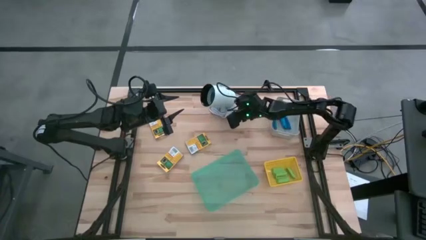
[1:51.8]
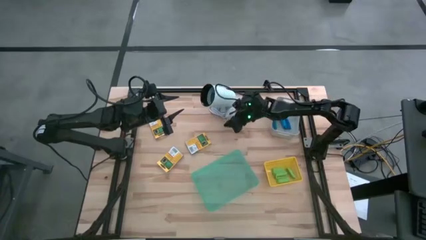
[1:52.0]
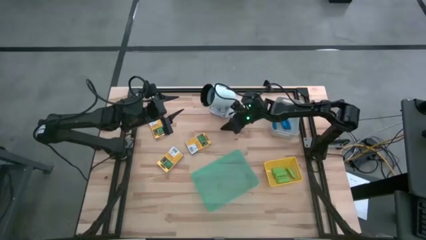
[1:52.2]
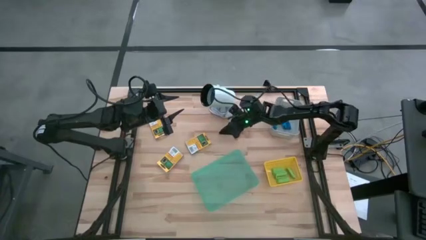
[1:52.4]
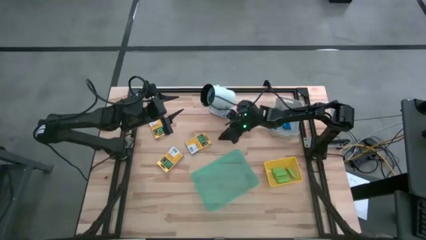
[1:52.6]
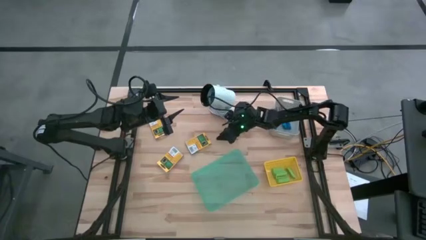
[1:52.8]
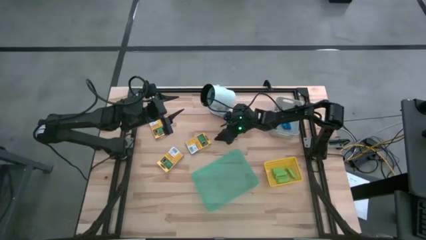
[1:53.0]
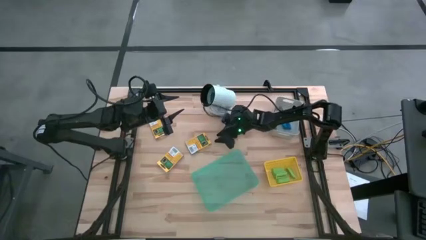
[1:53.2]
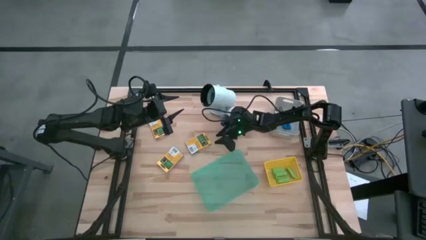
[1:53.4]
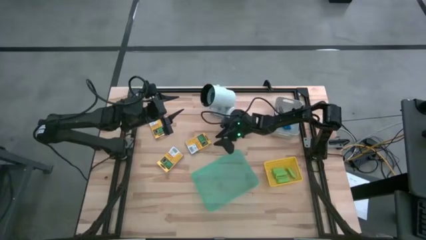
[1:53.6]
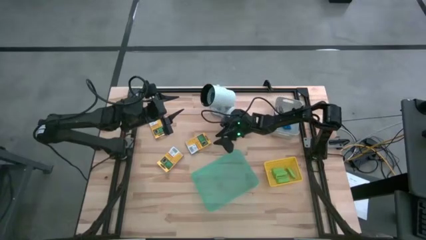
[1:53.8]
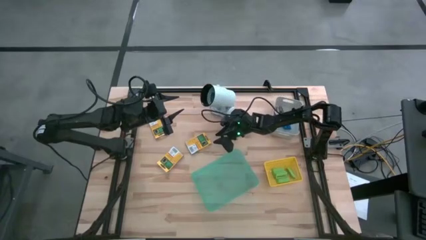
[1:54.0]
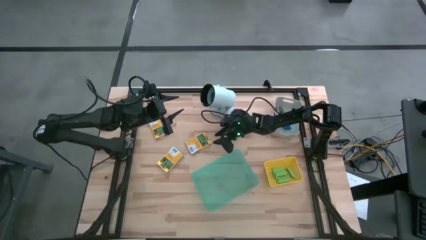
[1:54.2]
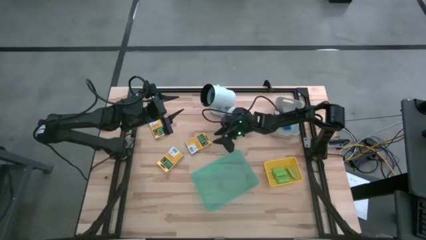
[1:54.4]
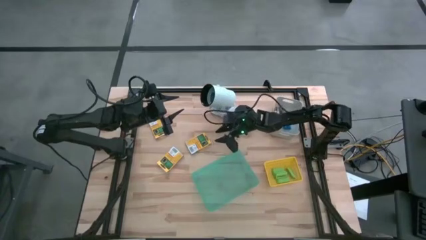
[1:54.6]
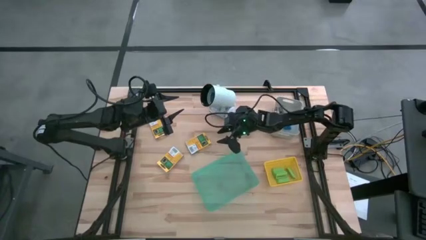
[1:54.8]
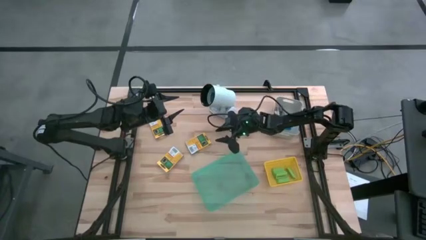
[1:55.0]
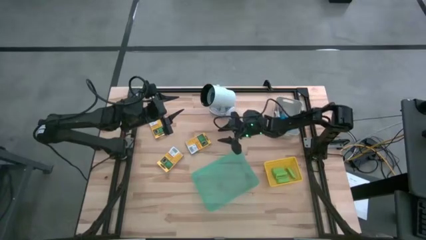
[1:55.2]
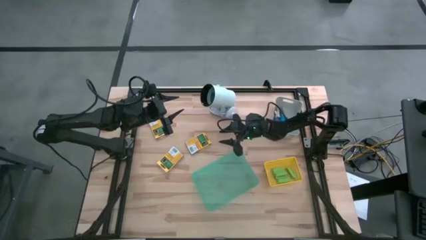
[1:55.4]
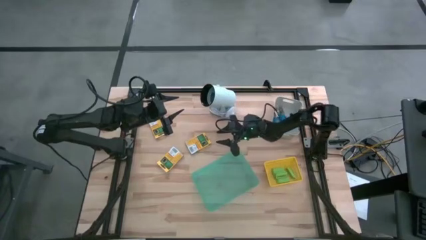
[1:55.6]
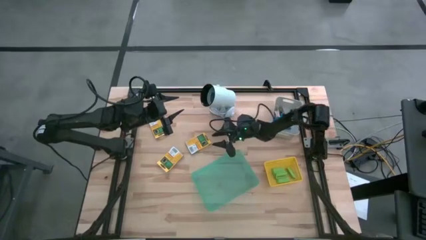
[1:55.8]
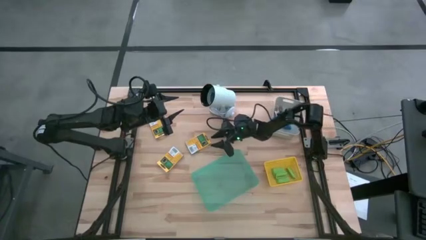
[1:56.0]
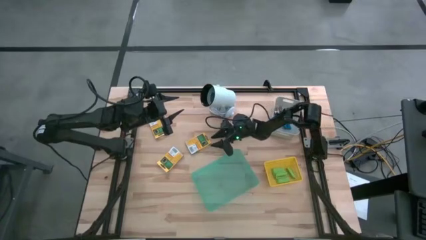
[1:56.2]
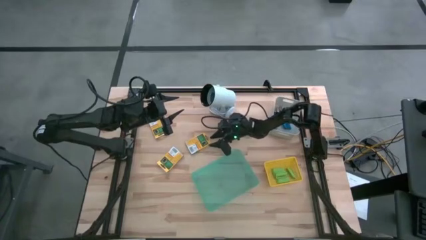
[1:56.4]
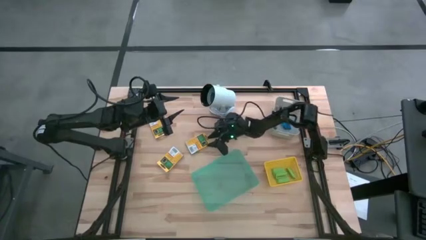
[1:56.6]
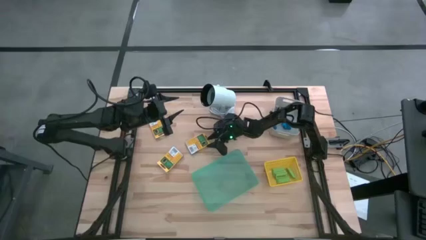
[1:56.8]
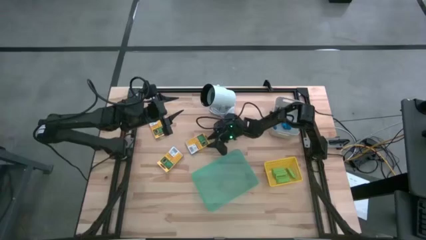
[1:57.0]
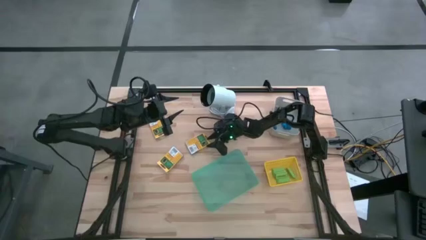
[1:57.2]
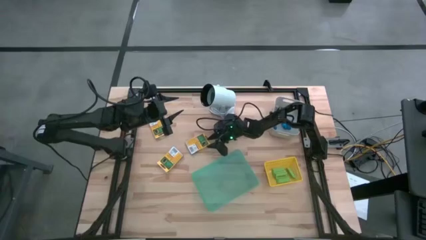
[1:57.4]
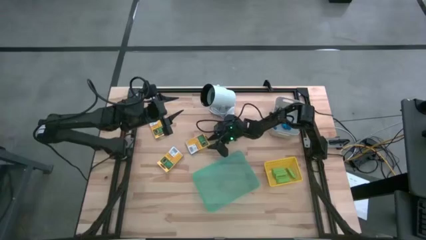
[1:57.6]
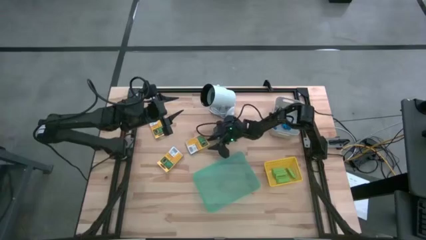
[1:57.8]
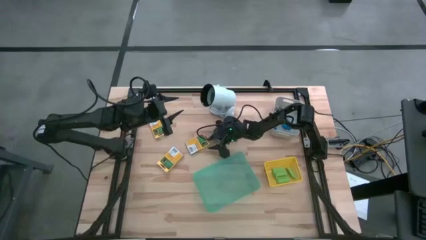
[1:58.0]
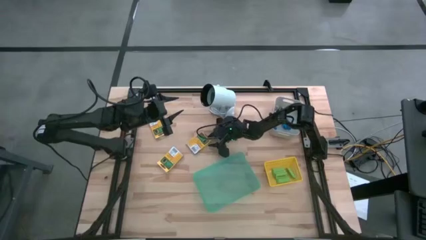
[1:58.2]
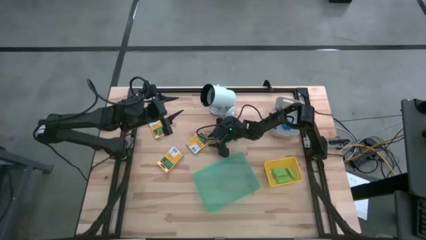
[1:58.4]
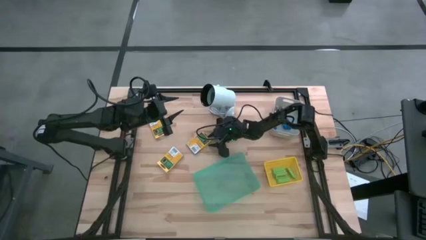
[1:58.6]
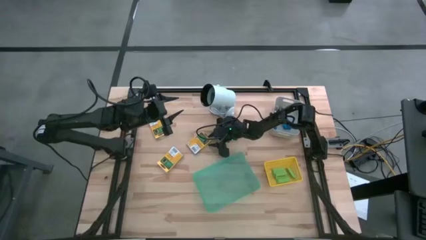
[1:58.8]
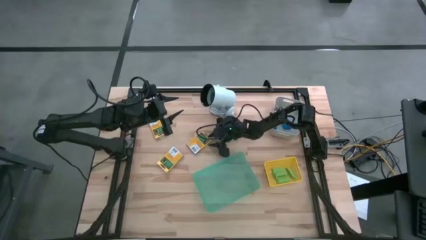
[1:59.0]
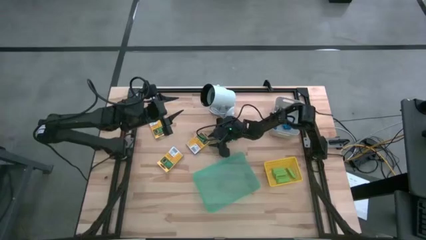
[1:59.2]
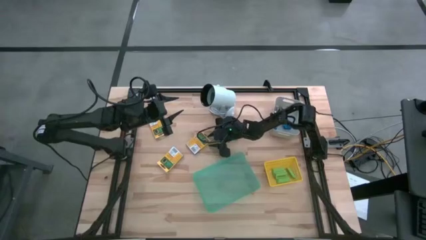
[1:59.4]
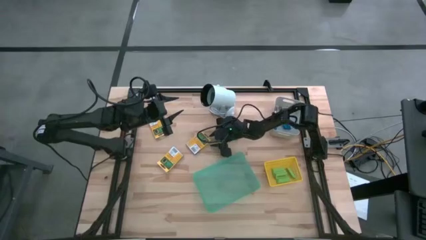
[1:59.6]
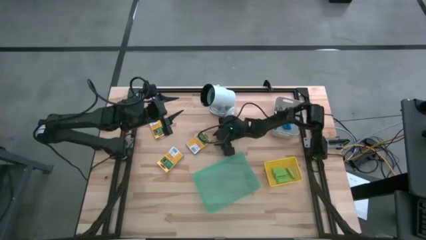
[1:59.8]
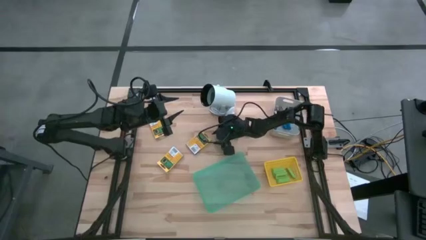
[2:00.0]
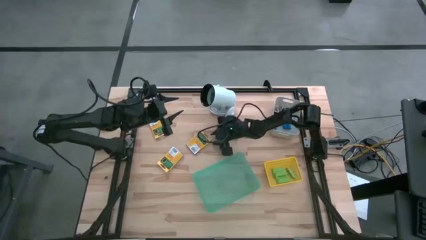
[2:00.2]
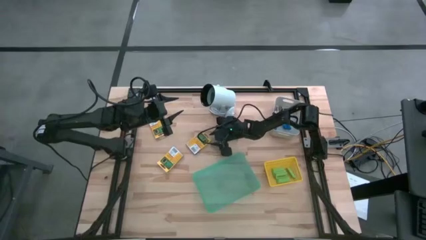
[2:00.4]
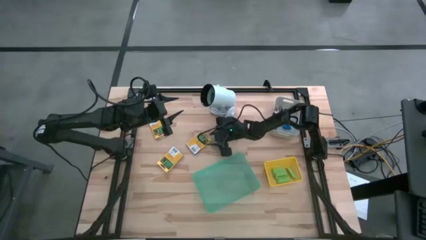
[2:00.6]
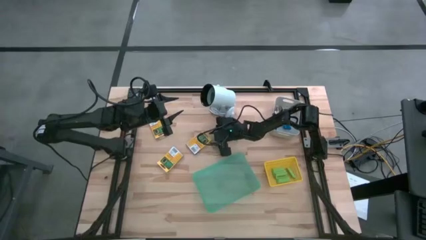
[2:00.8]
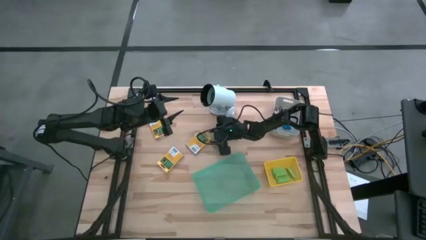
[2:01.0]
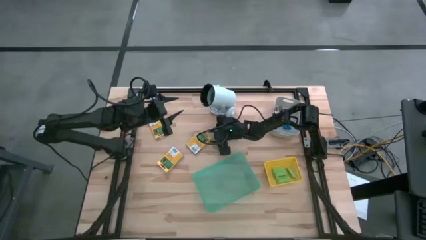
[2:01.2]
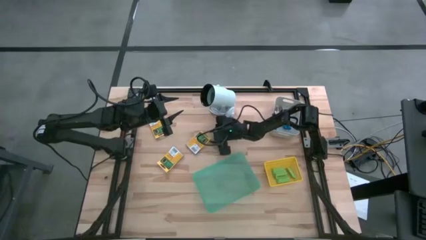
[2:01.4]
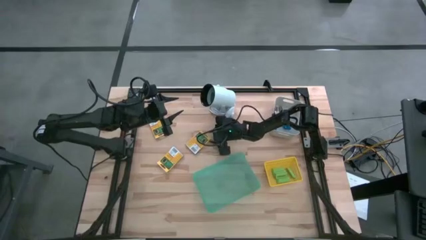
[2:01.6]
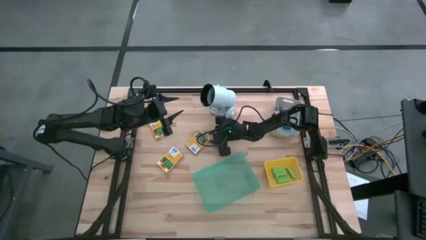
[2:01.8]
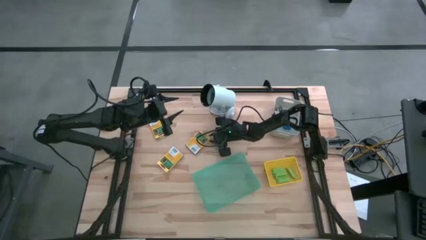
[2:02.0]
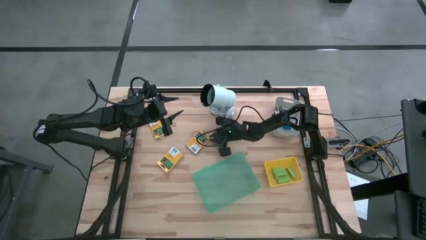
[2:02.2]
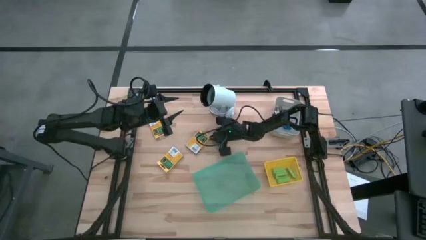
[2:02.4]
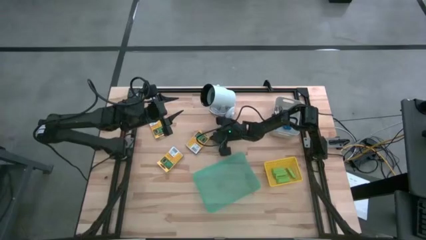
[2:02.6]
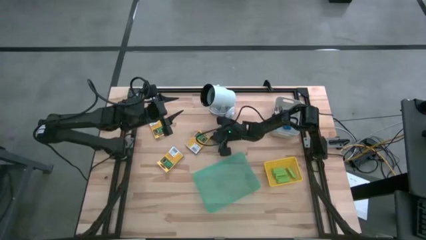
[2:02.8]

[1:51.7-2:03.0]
Task: Pick & Place School Supplies
Put the yellow crayon box into the green bin
